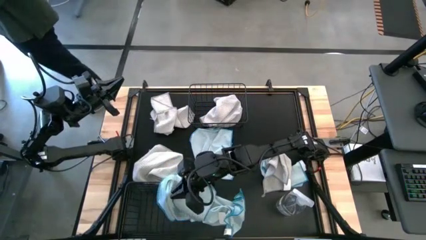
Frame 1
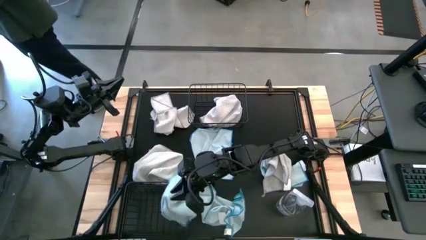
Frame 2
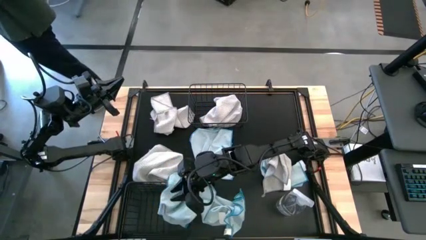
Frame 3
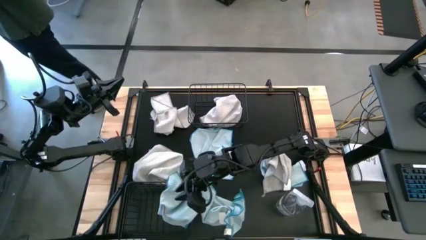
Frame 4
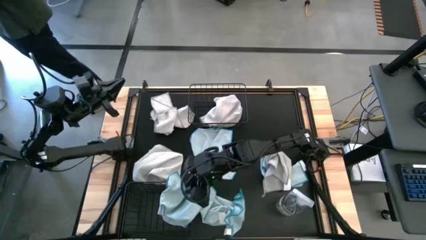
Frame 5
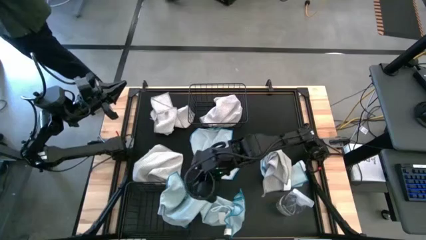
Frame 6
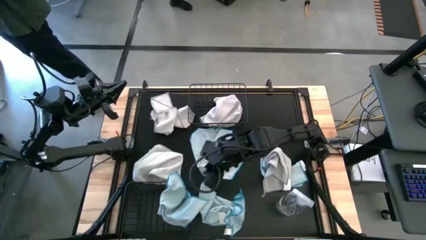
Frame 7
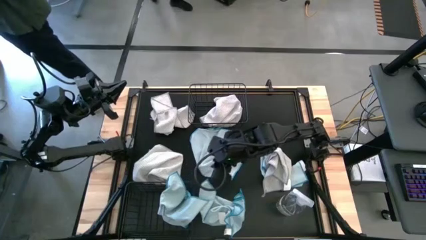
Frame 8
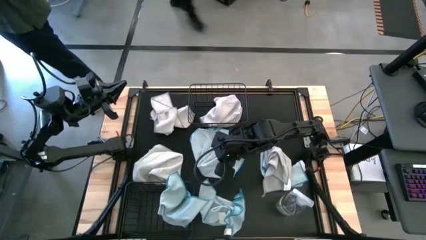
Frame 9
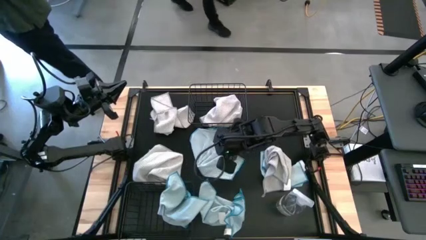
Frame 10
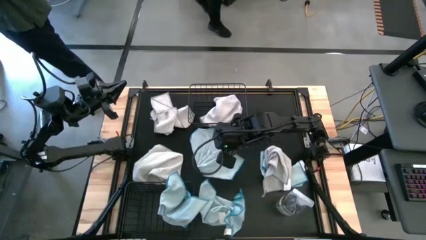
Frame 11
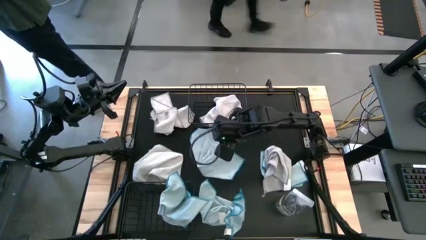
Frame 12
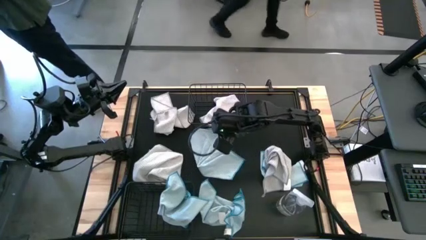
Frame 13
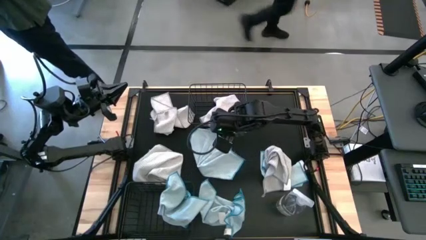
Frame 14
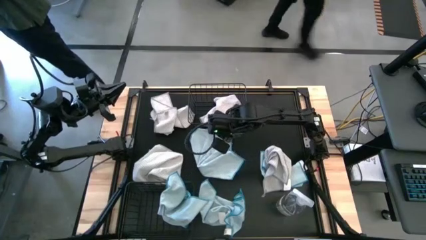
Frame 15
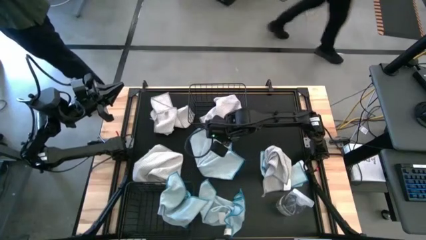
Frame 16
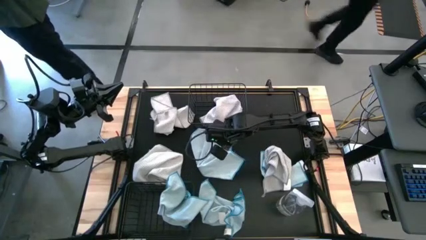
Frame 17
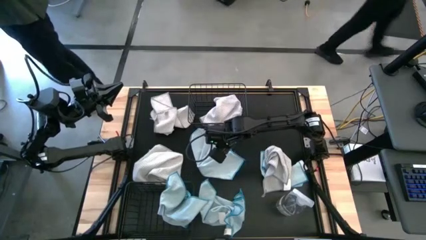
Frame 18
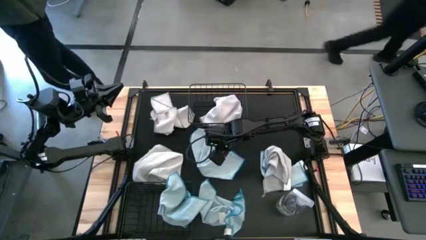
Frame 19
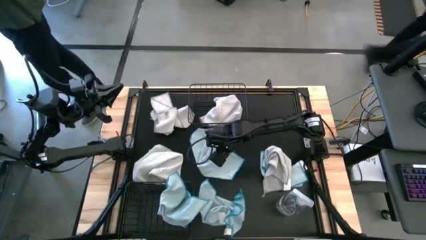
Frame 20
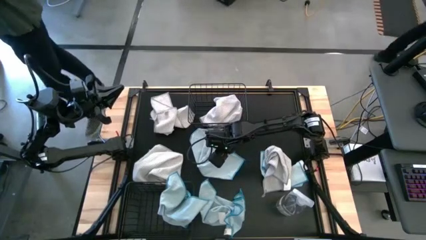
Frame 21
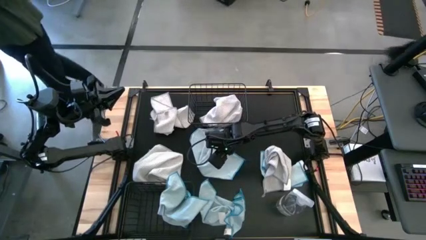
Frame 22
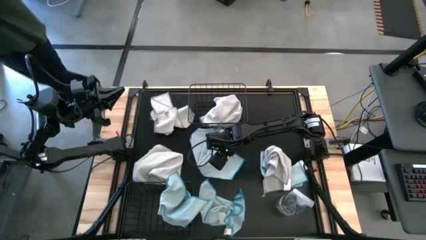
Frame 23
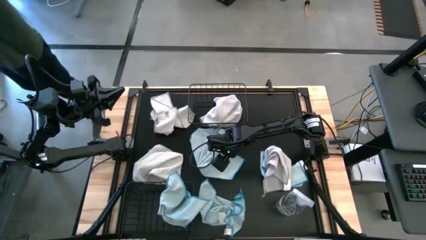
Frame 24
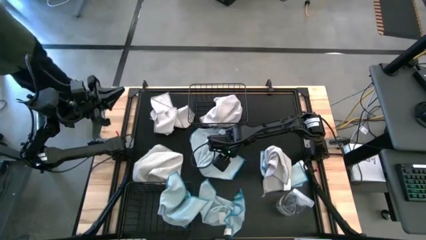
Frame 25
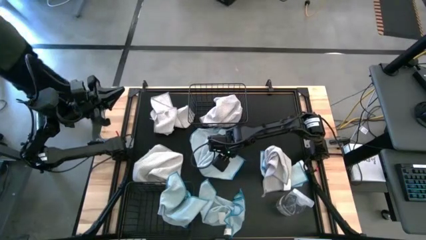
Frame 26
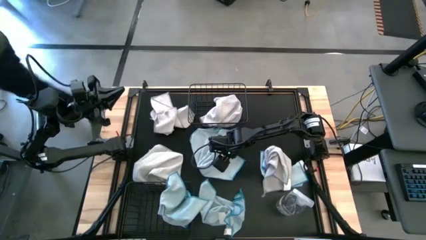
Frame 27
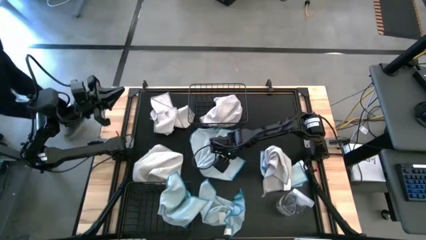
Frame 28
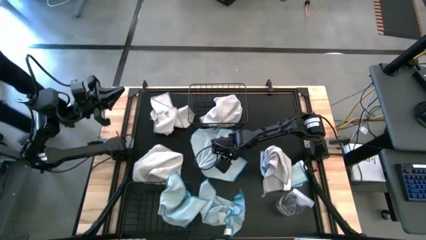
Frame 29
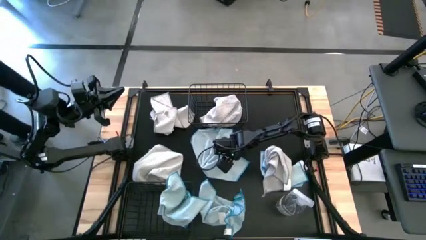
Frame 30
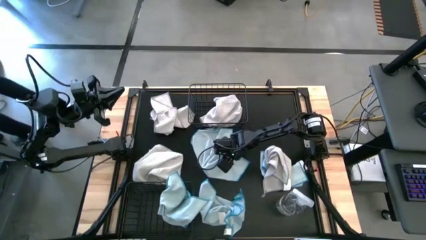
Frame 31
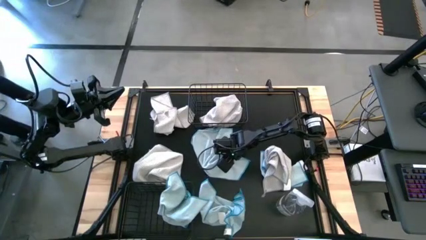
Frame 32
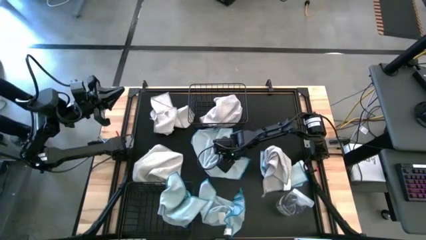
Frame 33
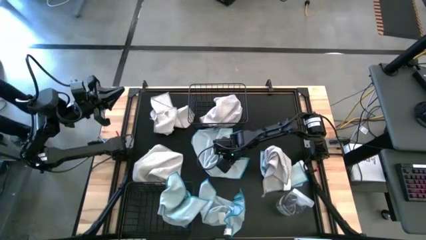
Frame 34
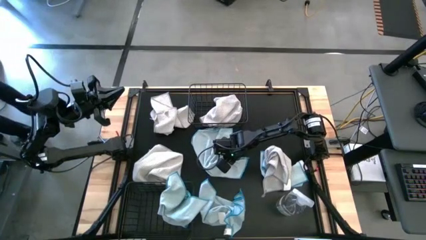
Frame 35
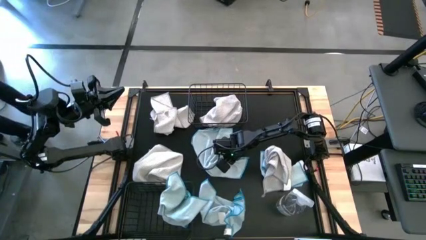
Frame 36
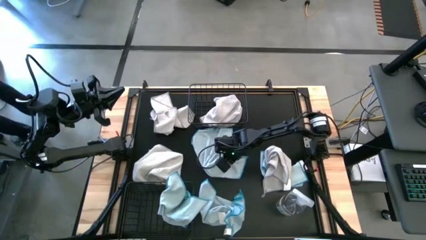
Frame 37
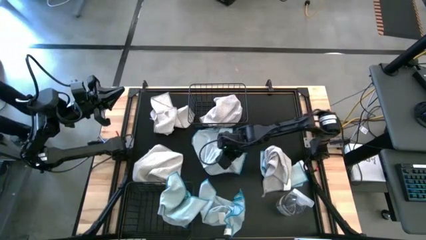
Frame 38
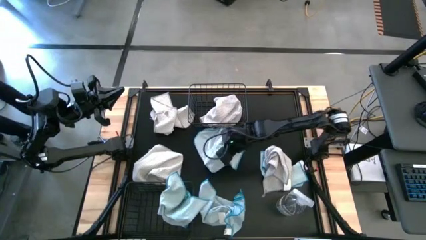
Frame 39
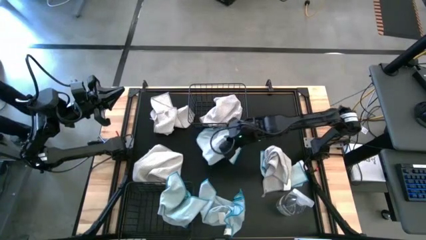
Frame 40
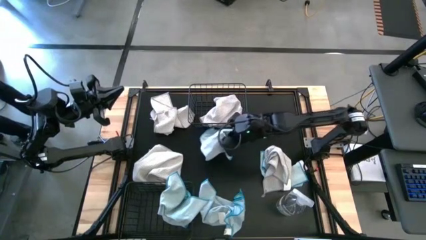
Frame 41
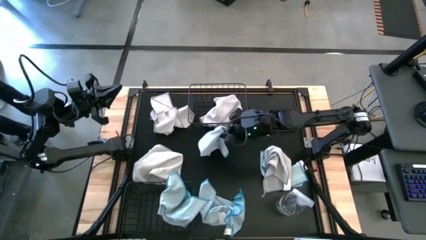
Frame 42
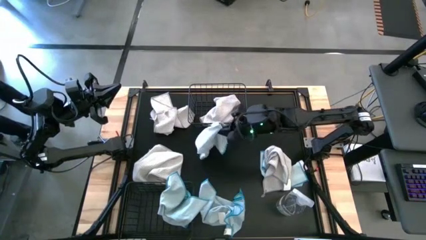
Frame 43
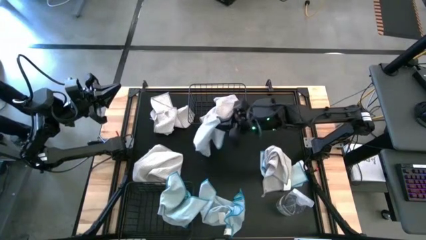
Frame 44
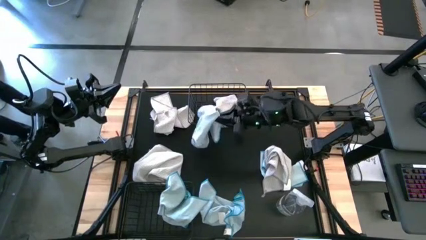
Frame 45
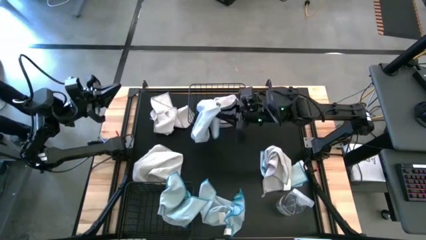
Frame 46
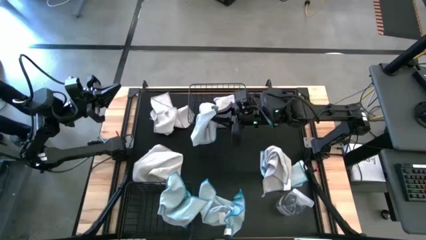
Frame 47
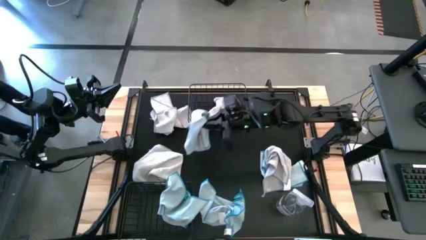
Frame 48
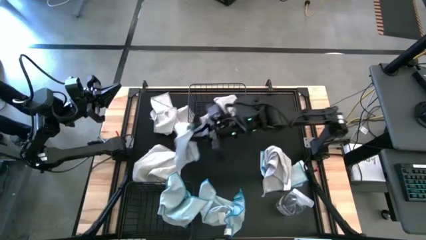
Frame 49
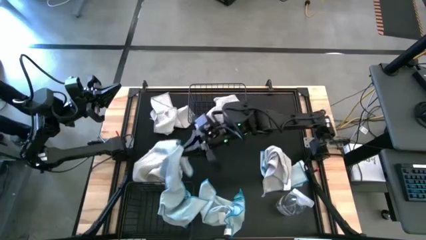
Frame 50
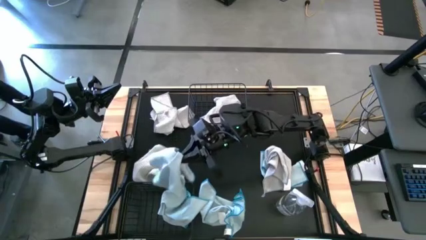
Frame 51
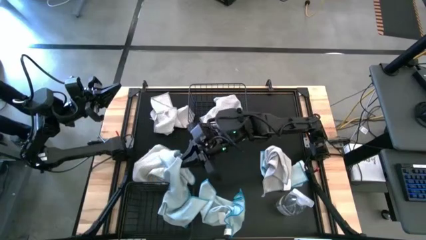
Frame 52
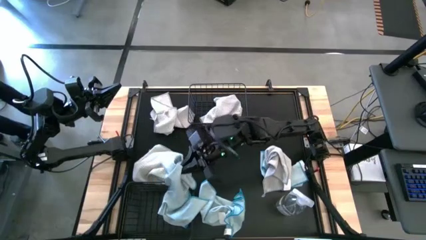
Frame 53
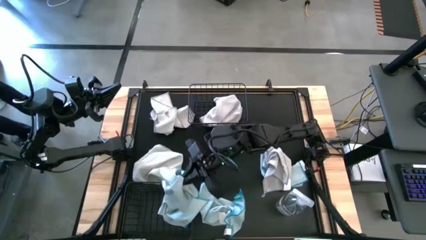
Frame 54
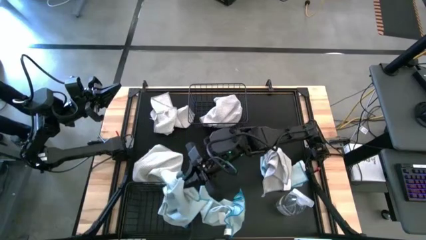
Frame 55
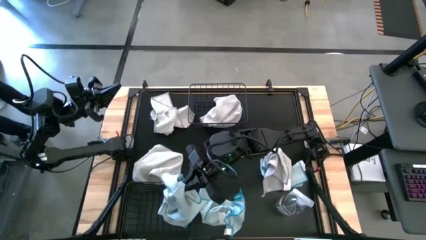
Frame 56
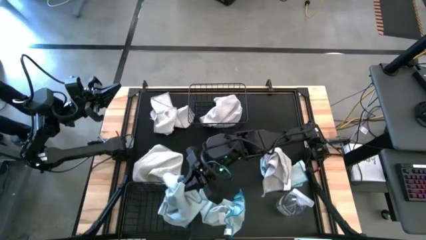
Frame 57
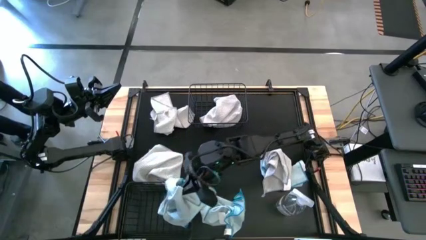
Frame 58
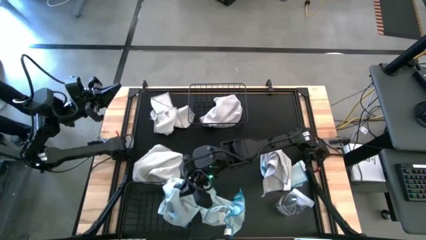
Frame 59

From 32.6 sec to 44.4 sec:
Task: Sort microfiber towel by color & place in baskets
Put the top left blue microfiber cloth into the bottom wire basket
